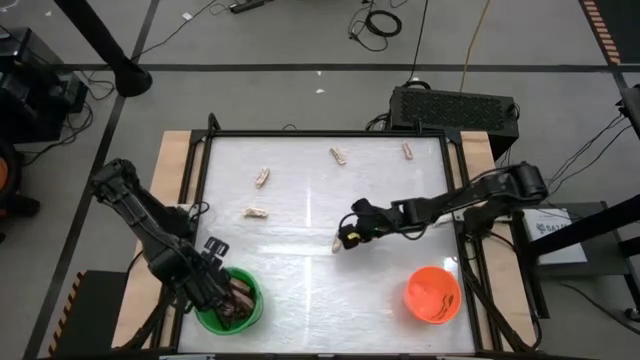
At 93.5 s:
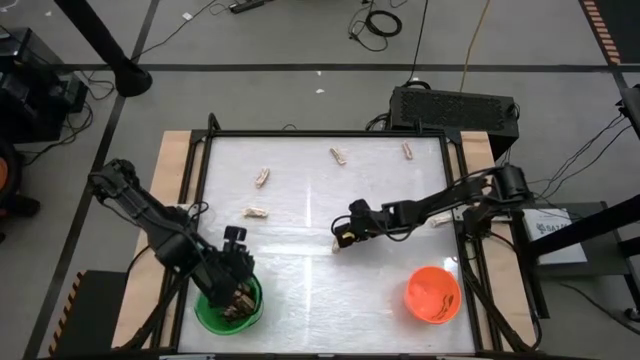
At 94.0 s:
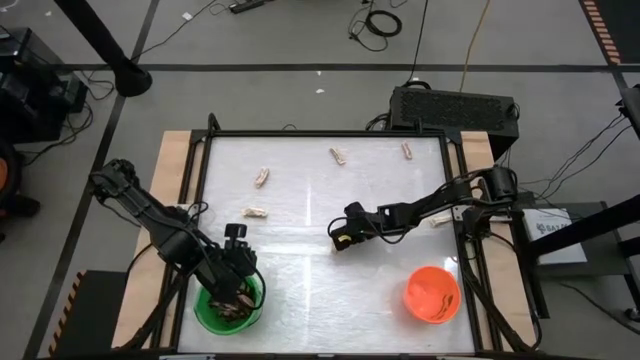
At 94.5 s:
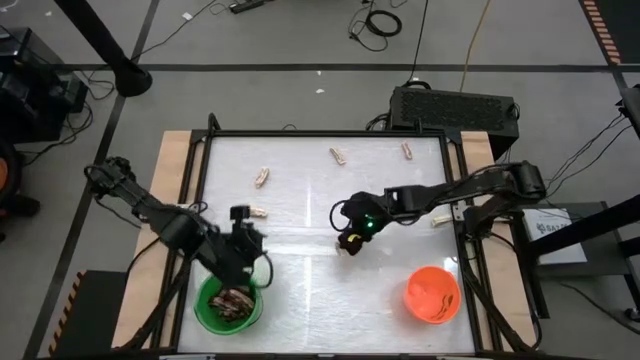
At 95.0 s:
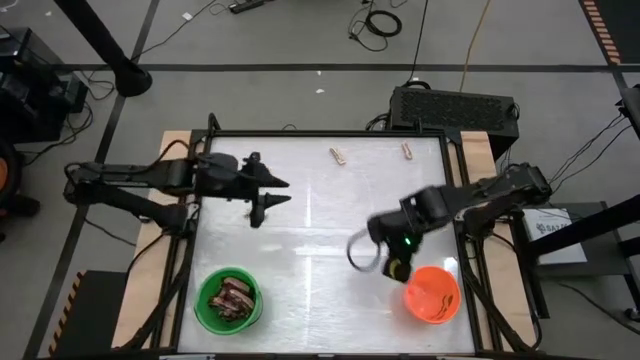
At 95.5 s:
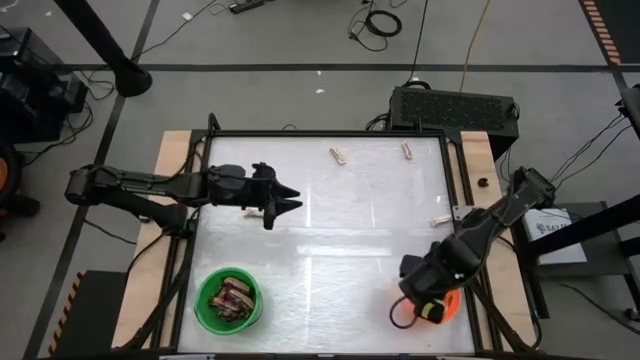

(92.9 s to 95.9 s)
Task: Sort candy by brand, put in halloween buckets
Put the white candy into the orange bucket

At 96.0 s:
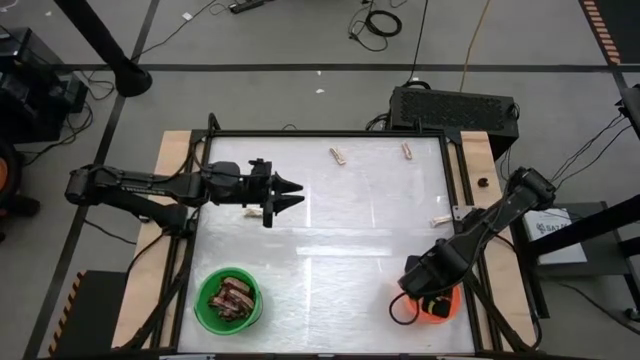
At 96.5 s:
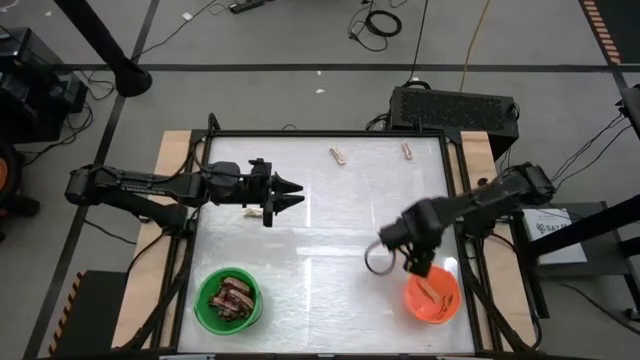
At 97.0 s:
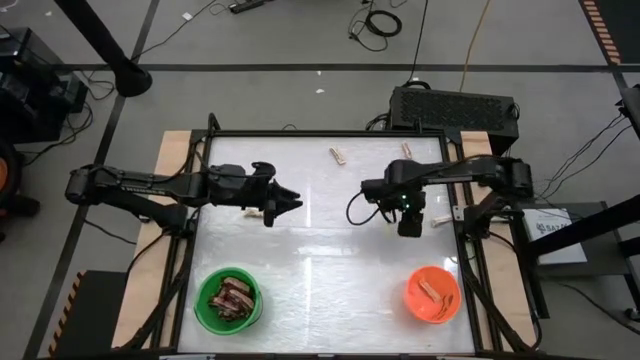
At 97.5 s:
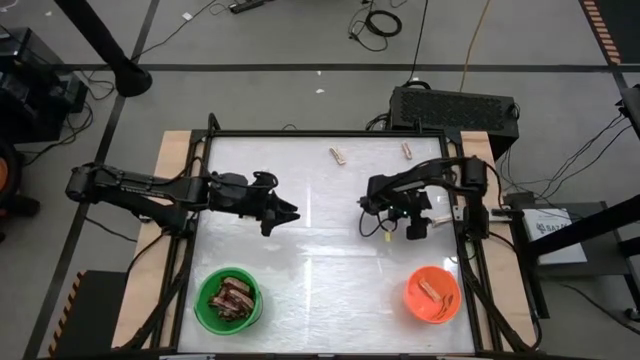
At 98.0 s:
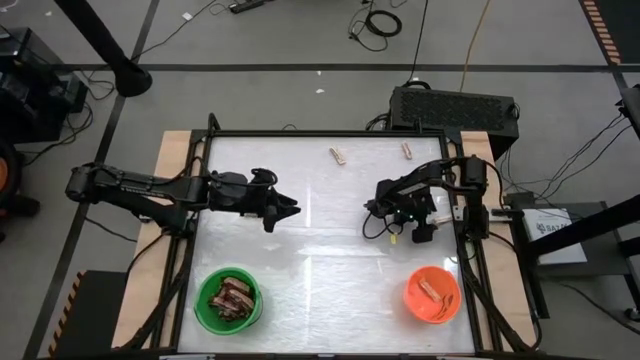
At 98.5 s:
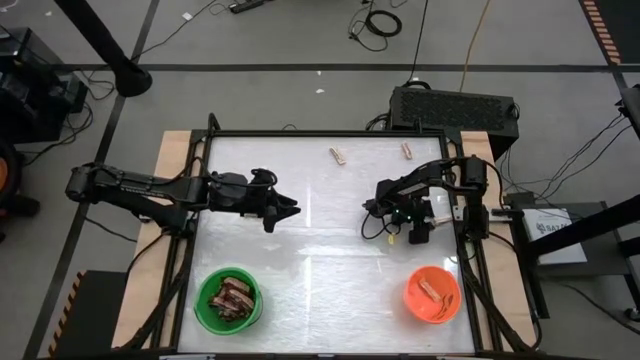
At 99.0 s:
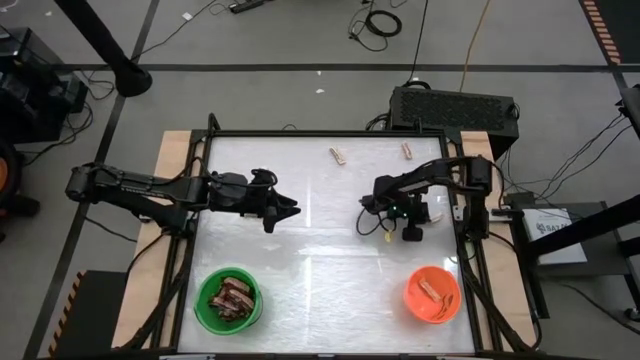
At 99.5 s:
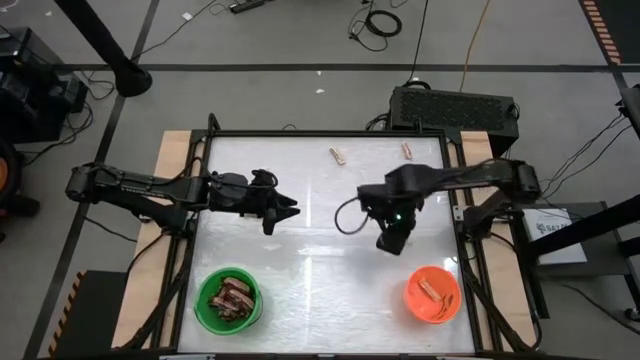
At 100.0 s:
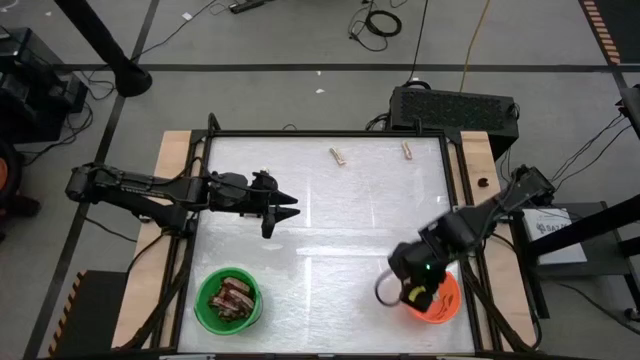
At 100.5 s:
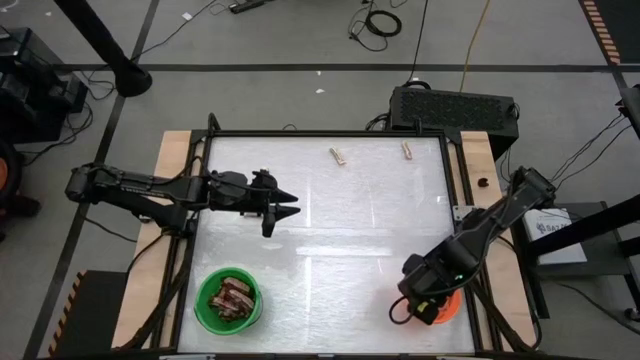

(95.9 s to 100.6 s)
Put the white candy into the orange bucket

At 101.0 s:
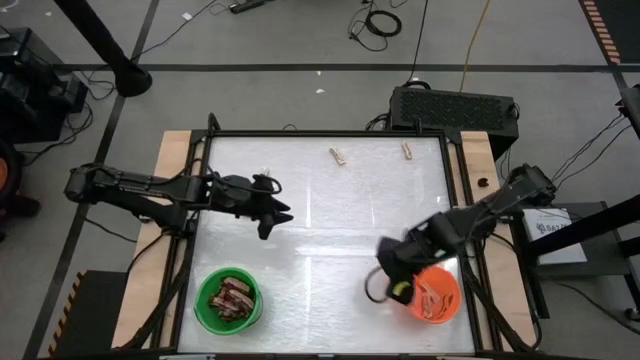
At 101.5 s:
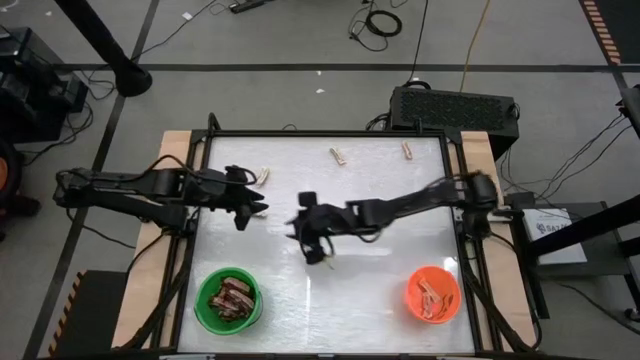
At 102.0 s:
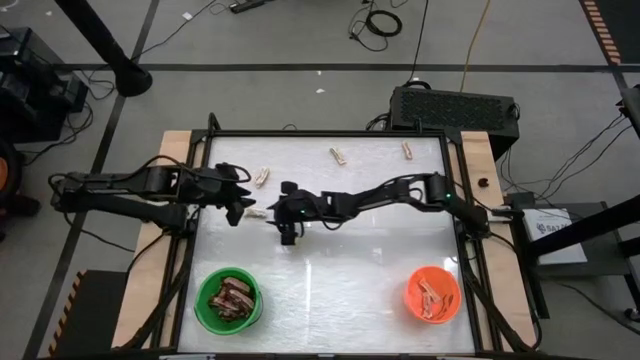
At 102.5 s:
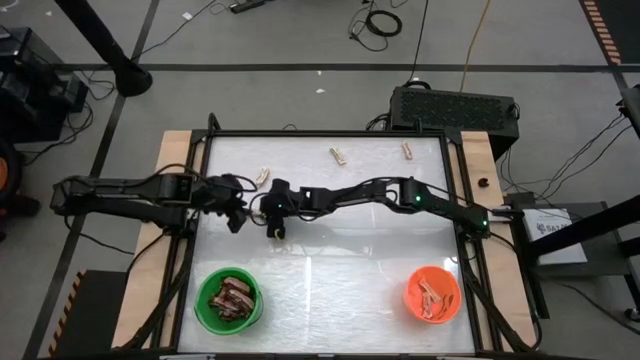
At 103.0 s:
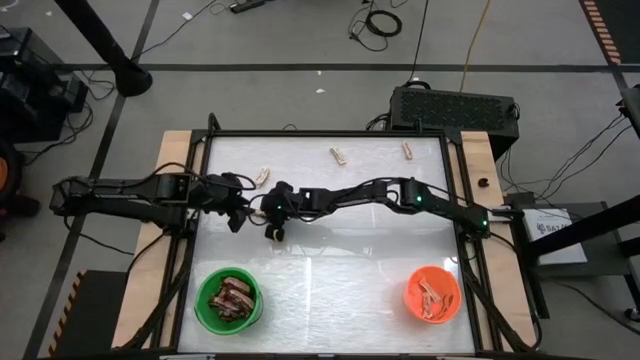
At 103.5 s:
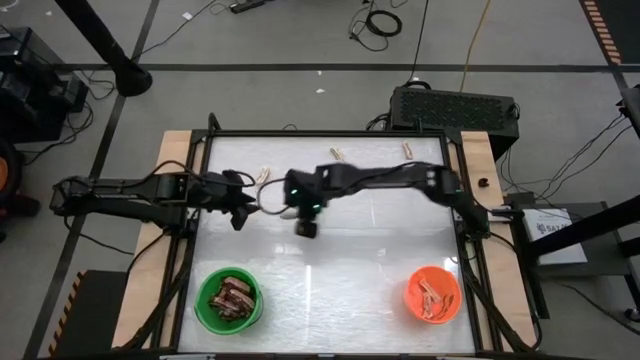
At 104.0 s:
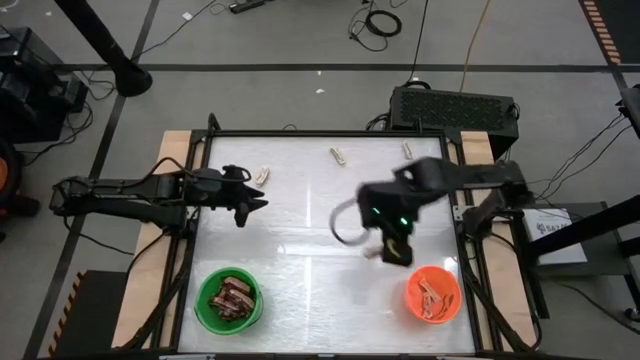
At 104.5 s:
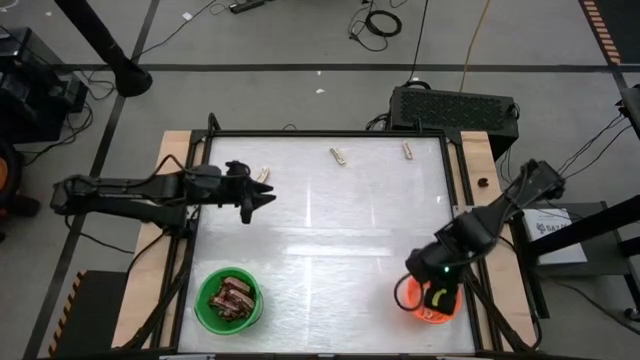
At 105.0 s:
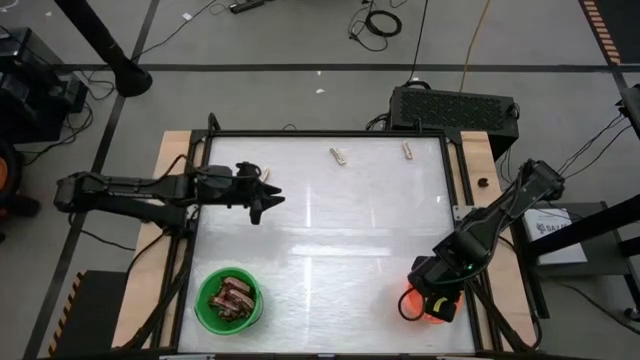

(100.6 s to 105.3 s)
Put the white candy into the orange bucket

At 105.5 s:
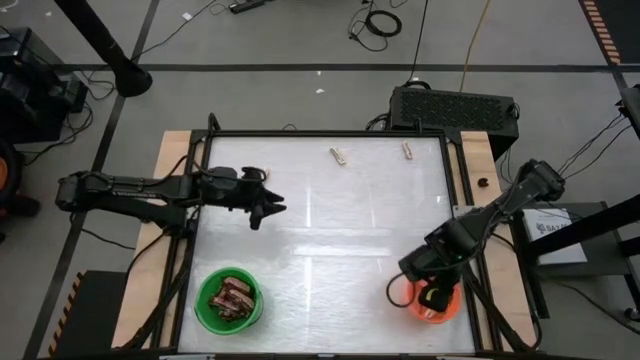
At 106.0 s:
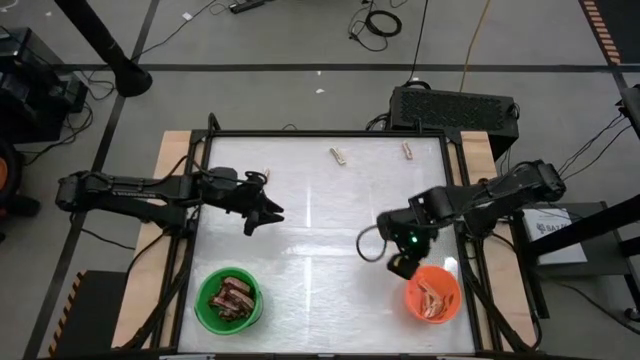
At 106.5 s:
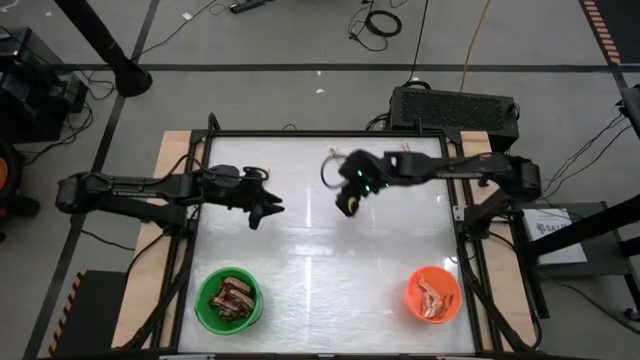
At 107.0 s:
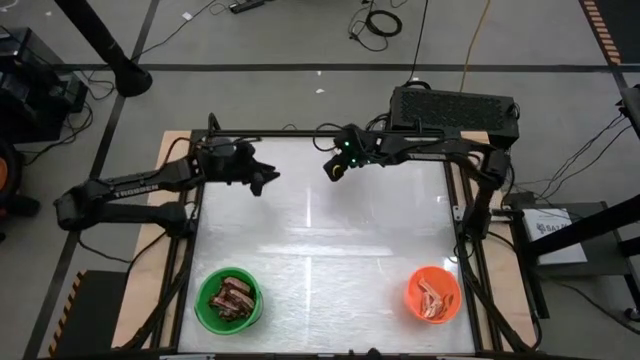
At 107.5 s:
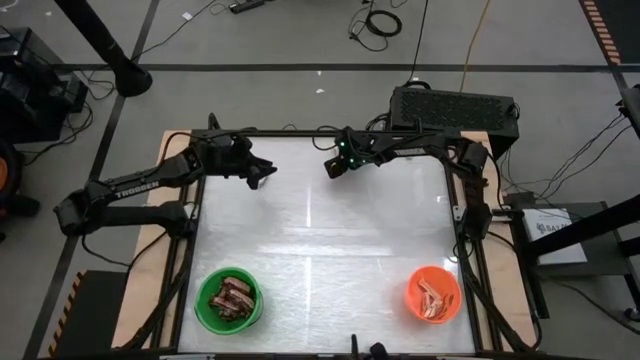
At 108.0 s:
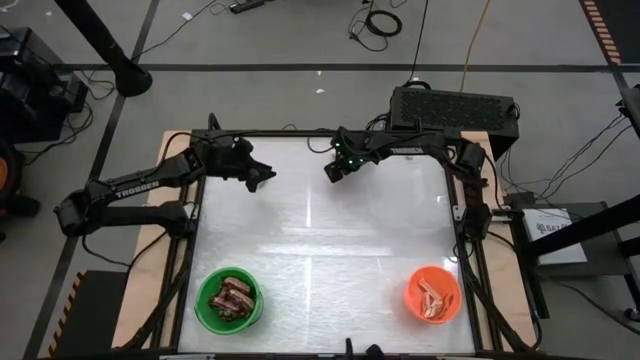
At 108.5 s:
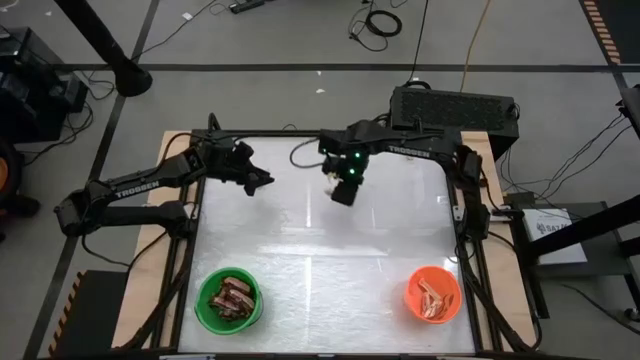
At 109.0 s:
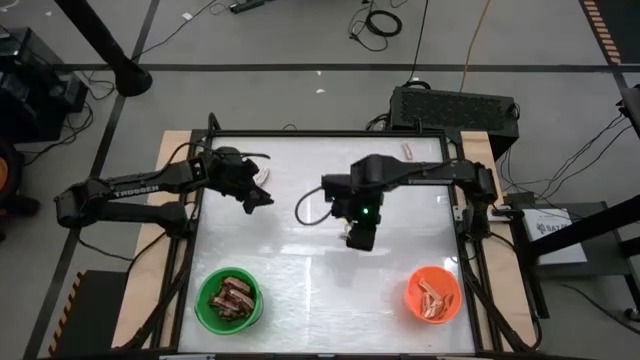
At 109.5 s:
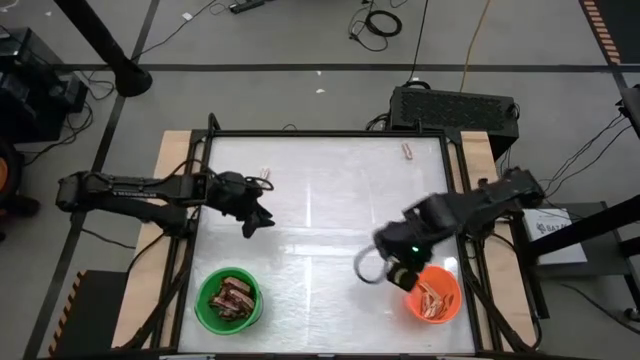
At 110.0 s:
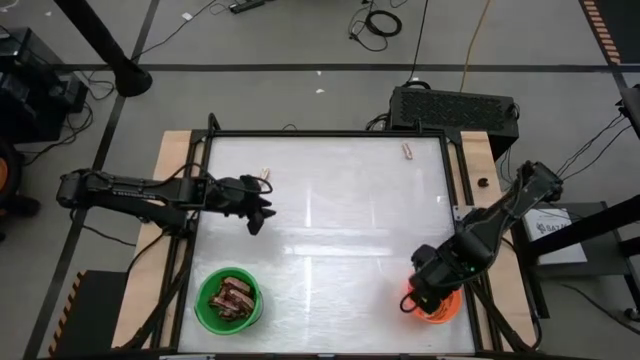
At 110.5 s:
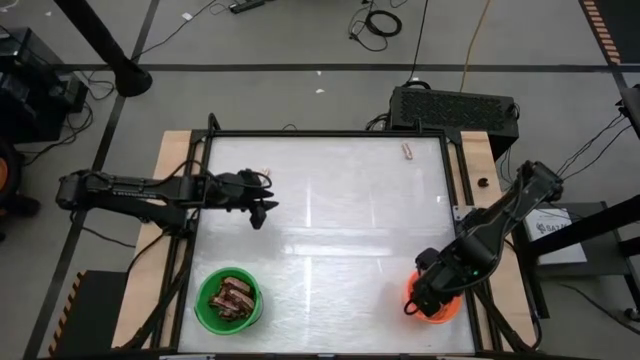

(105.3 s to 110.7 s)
Put the white candy into the orange bucket

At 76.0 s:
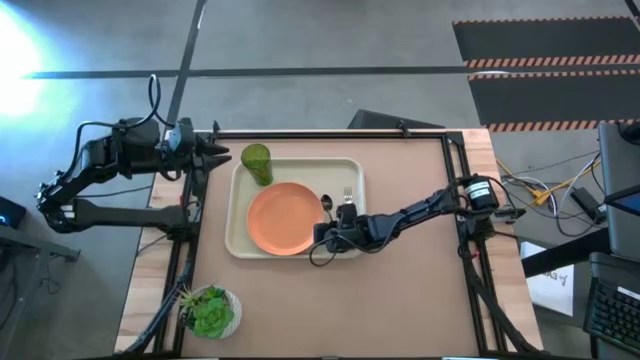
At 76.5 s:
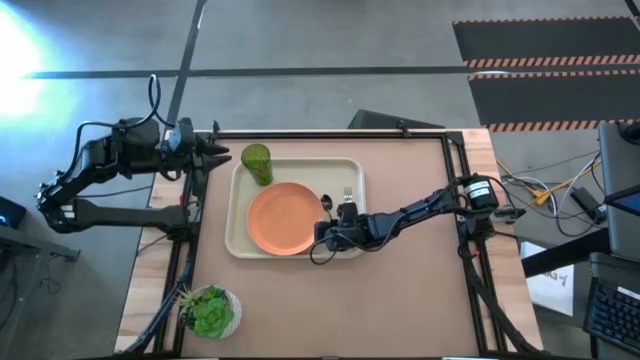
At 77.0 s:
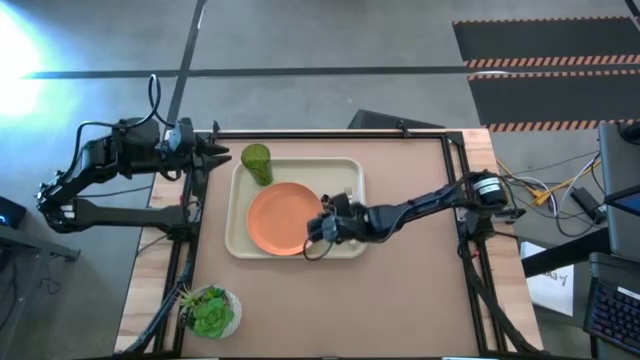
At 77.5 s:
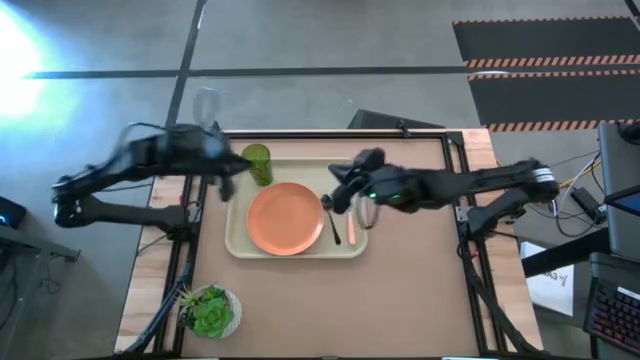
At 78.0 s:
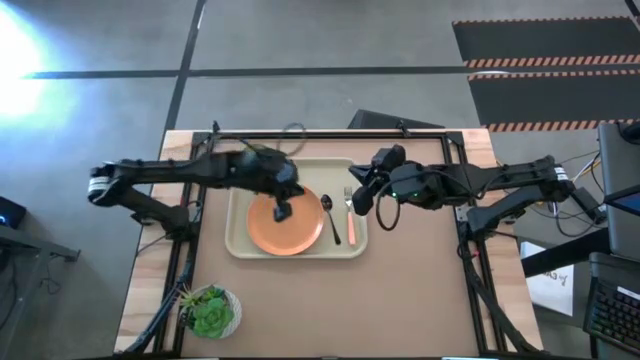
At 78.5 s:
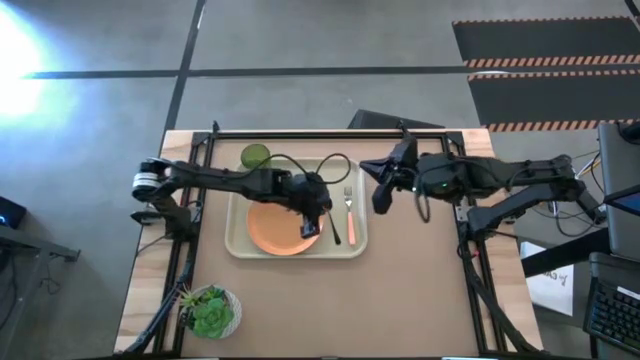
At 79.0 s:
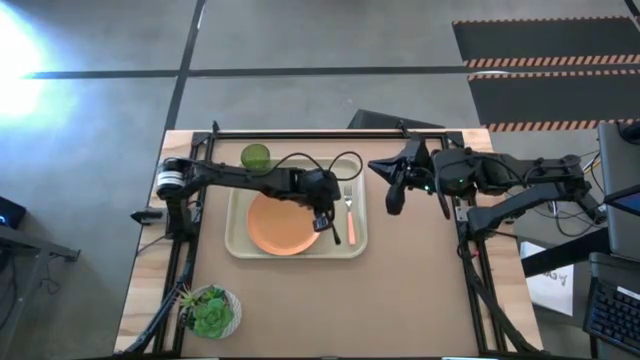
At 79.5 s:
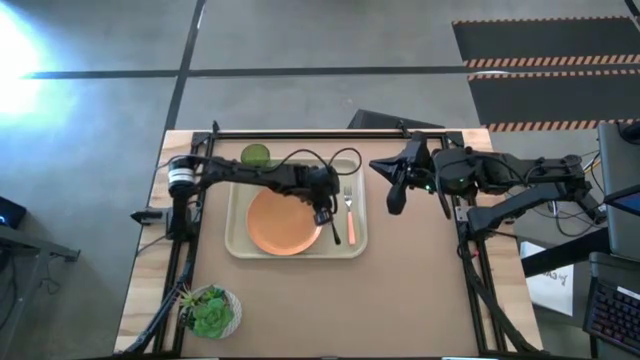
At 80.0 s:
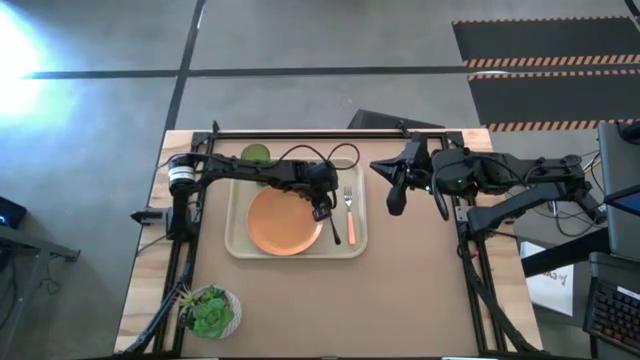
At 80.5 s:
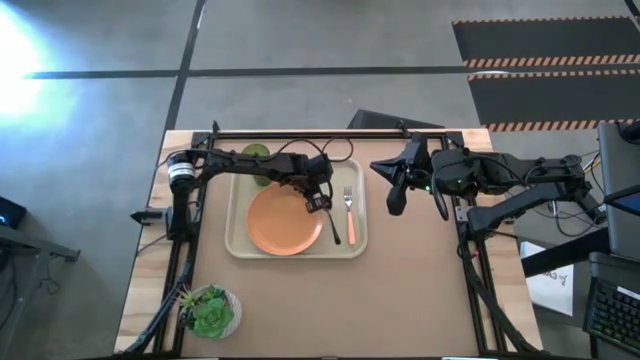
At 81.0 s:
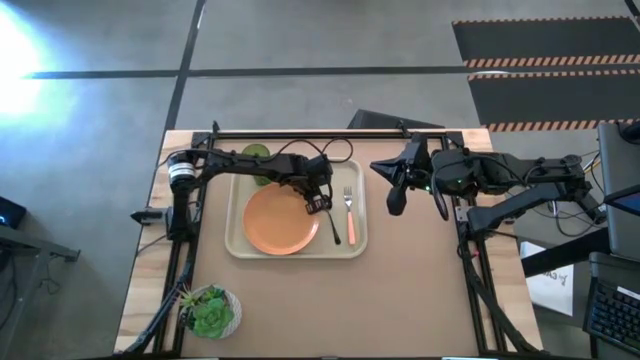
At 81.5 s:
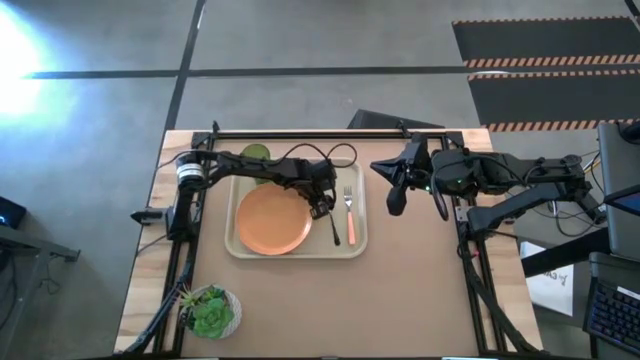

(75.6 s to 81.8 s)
Task: Pick and place plate/cup/fork/spoon on tray
Adjust the black spoon on the white serving tray
